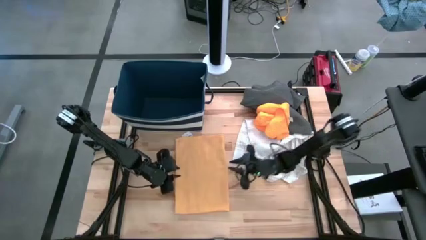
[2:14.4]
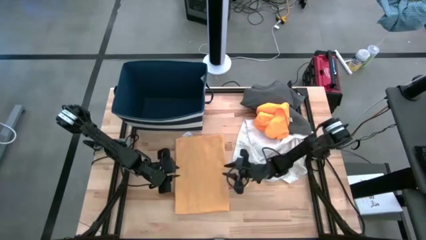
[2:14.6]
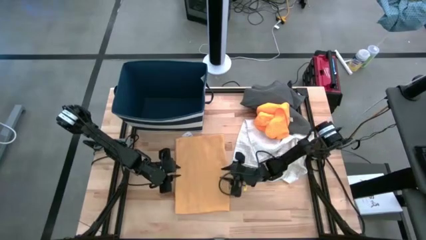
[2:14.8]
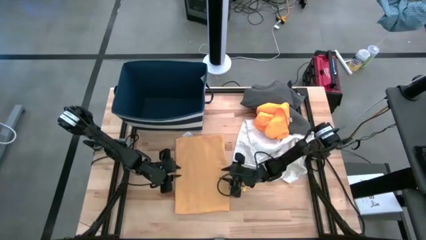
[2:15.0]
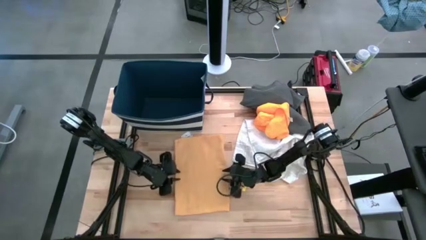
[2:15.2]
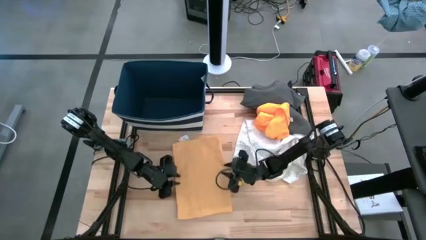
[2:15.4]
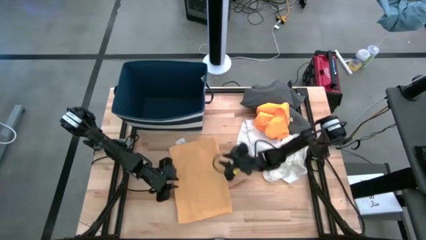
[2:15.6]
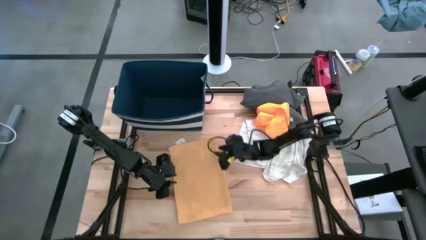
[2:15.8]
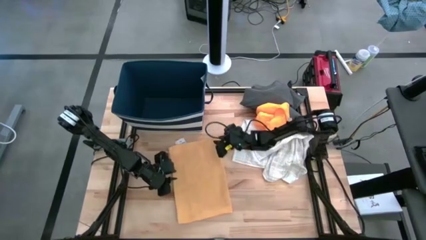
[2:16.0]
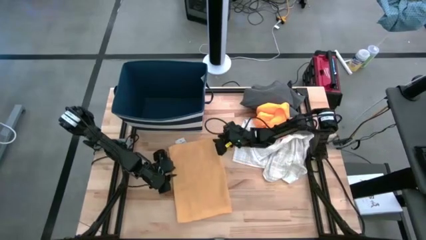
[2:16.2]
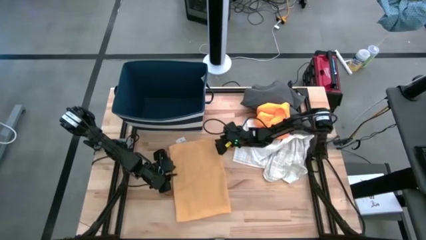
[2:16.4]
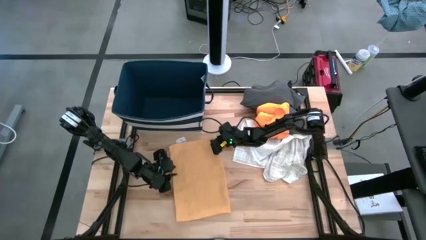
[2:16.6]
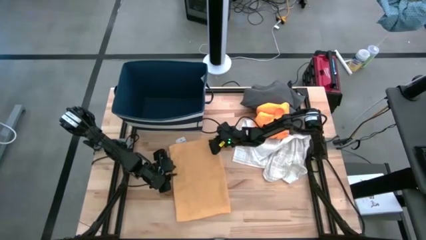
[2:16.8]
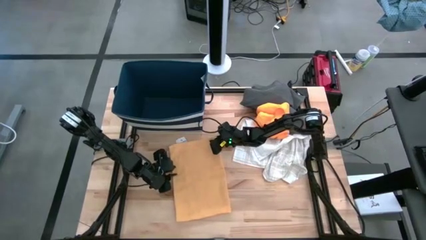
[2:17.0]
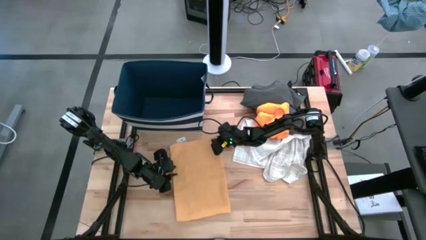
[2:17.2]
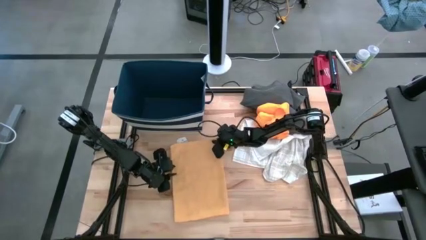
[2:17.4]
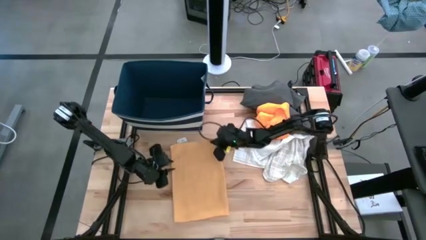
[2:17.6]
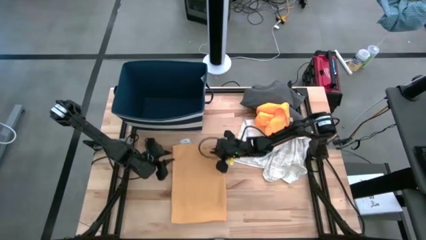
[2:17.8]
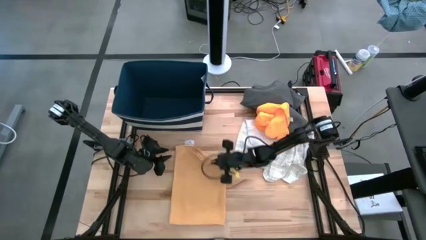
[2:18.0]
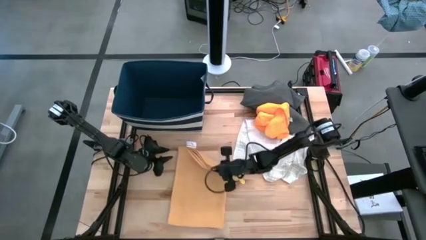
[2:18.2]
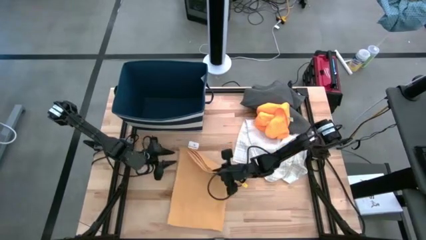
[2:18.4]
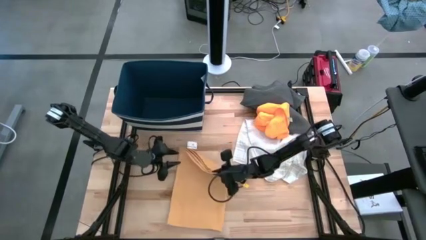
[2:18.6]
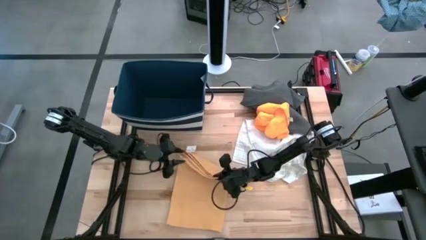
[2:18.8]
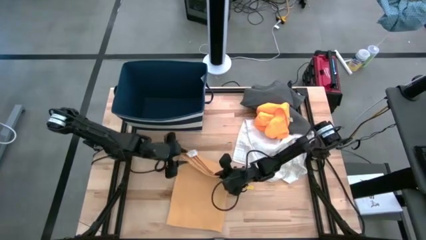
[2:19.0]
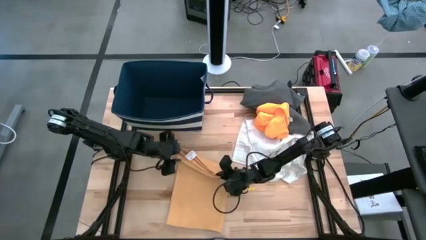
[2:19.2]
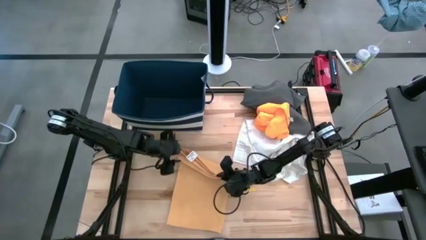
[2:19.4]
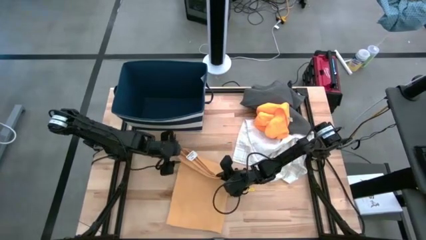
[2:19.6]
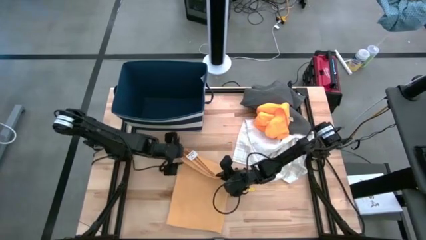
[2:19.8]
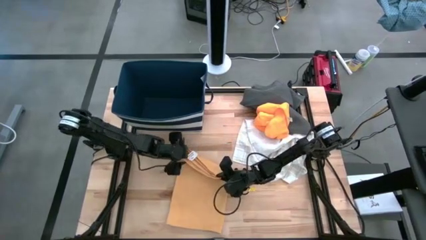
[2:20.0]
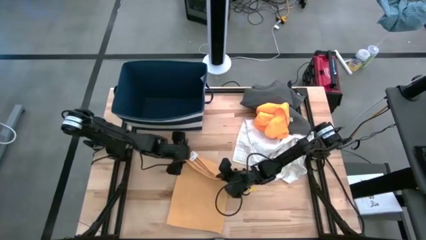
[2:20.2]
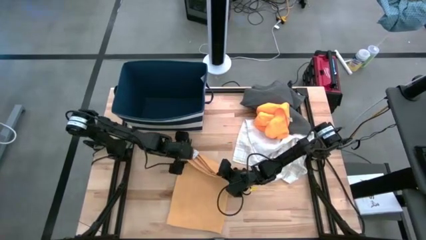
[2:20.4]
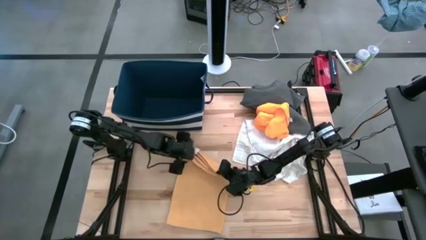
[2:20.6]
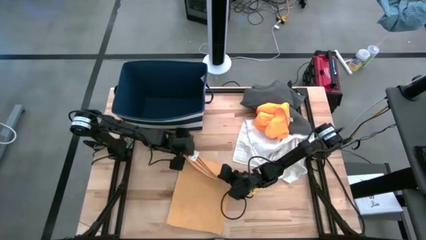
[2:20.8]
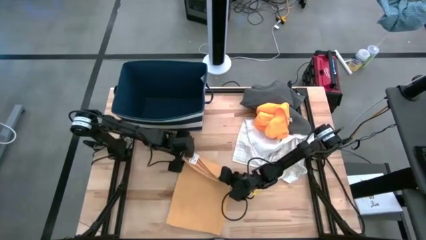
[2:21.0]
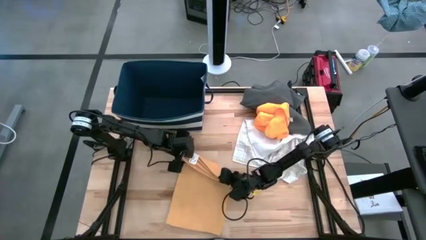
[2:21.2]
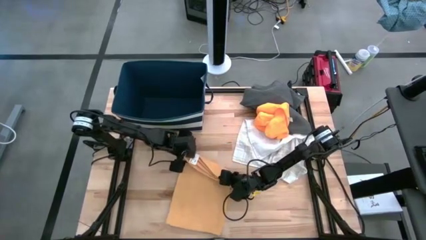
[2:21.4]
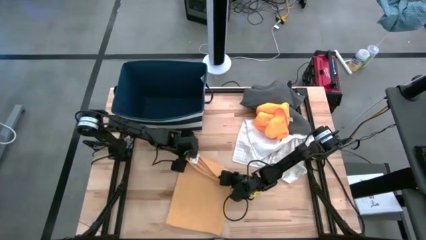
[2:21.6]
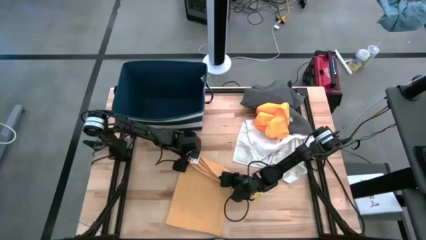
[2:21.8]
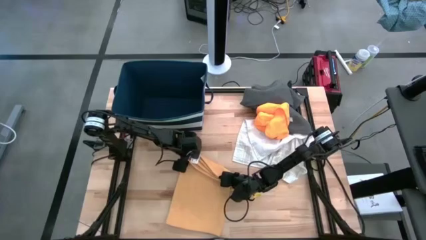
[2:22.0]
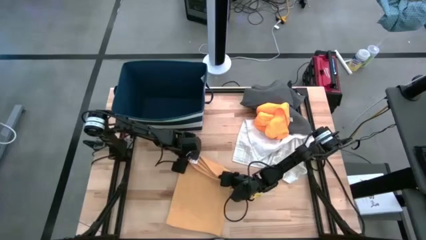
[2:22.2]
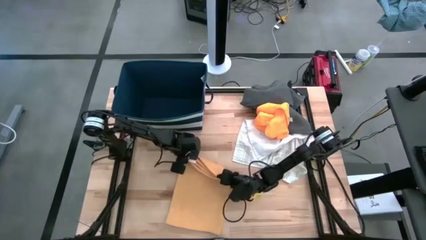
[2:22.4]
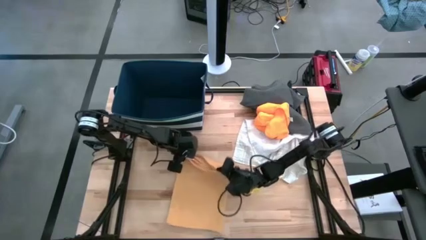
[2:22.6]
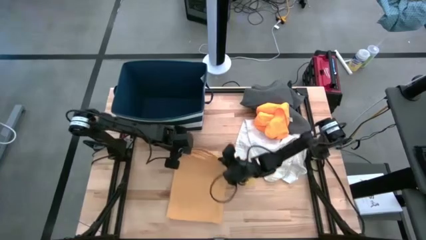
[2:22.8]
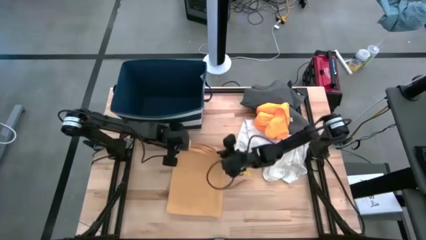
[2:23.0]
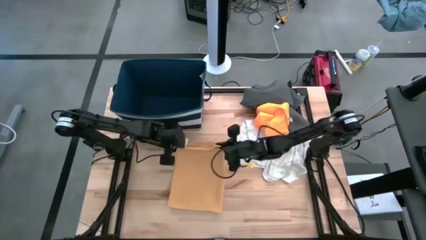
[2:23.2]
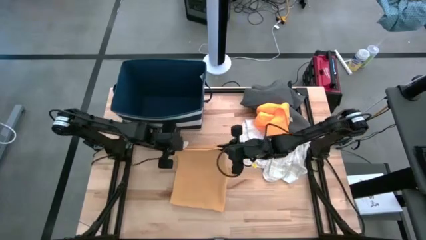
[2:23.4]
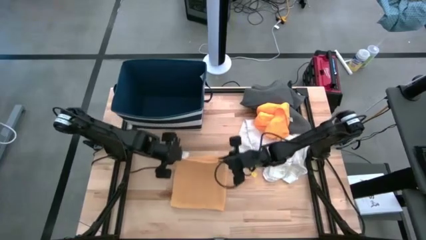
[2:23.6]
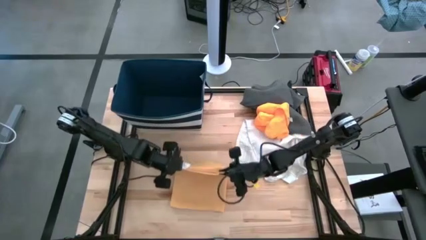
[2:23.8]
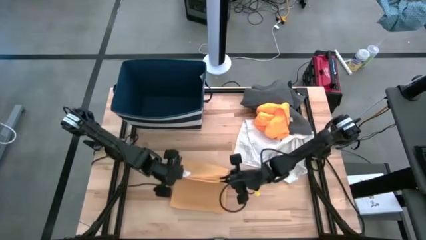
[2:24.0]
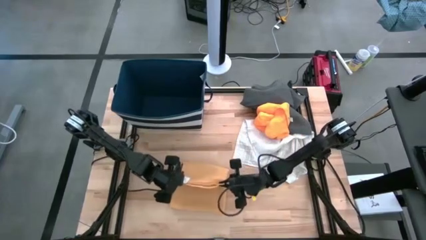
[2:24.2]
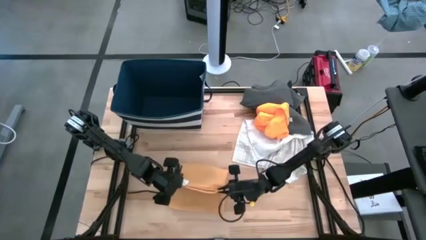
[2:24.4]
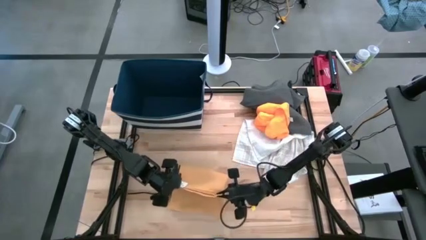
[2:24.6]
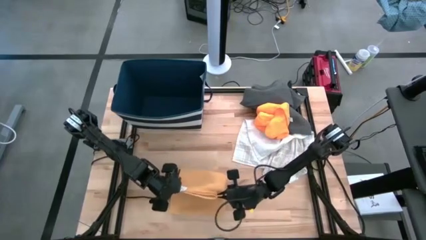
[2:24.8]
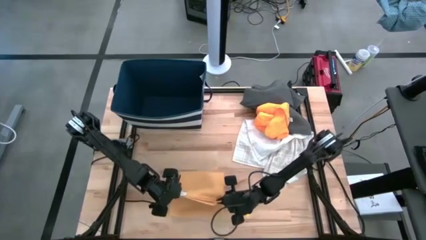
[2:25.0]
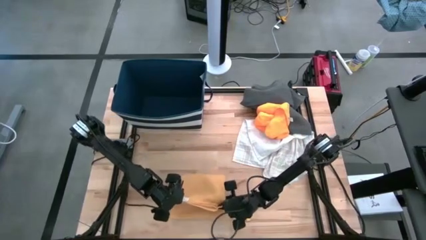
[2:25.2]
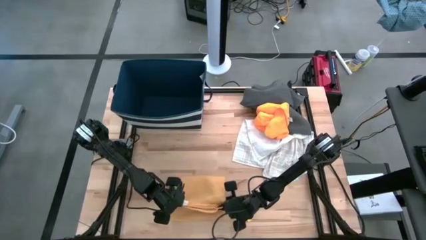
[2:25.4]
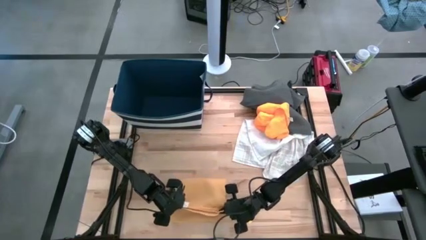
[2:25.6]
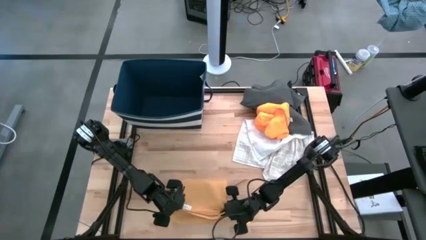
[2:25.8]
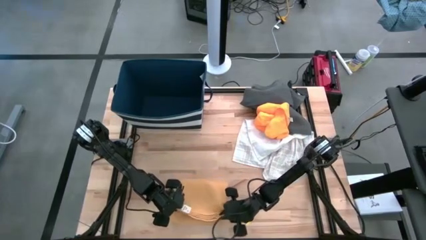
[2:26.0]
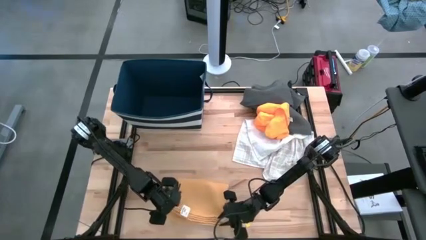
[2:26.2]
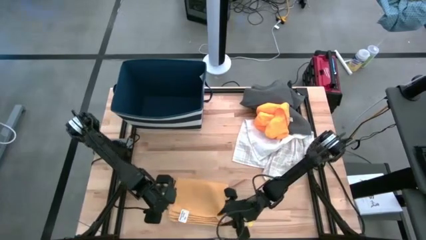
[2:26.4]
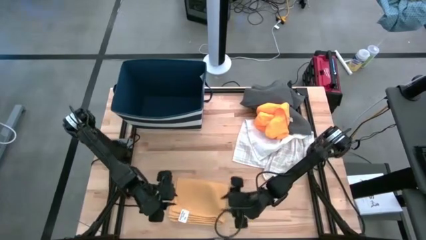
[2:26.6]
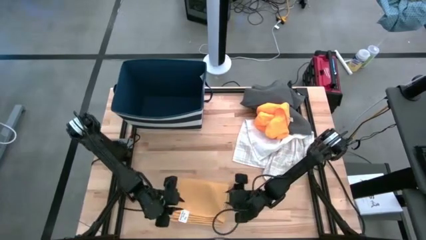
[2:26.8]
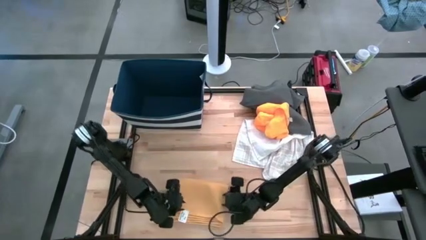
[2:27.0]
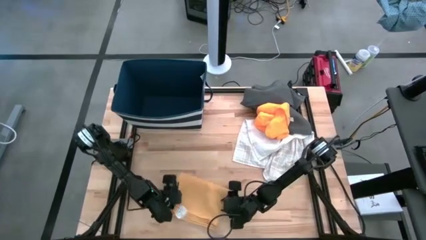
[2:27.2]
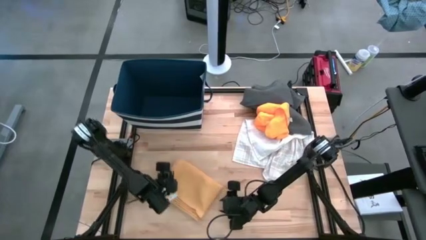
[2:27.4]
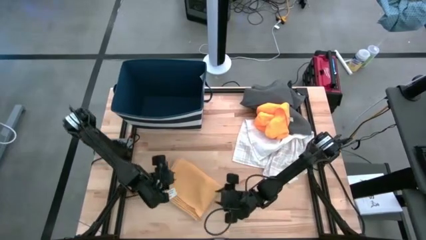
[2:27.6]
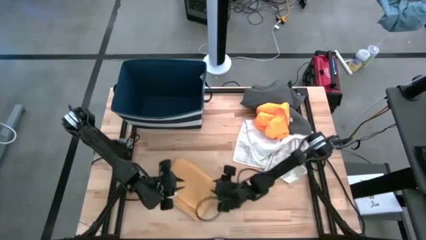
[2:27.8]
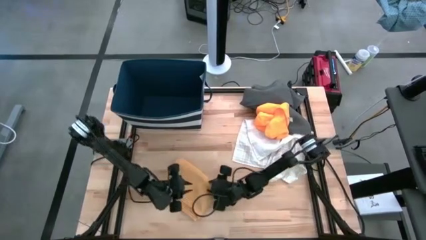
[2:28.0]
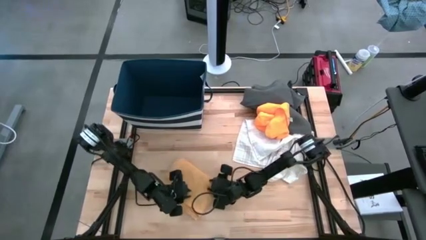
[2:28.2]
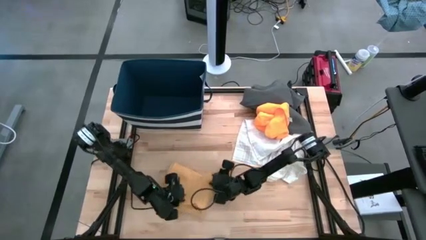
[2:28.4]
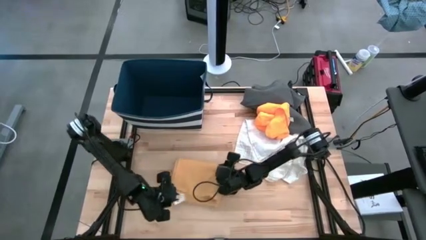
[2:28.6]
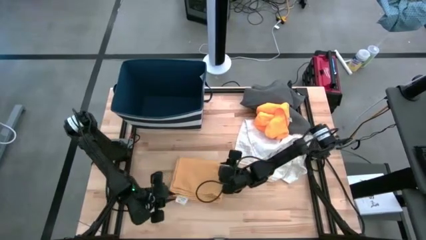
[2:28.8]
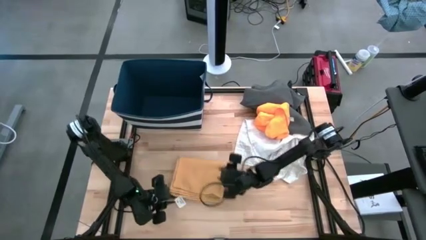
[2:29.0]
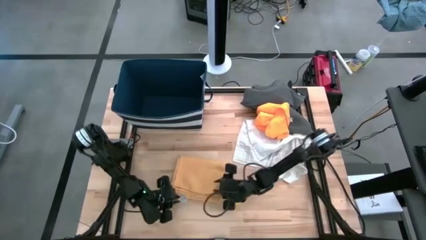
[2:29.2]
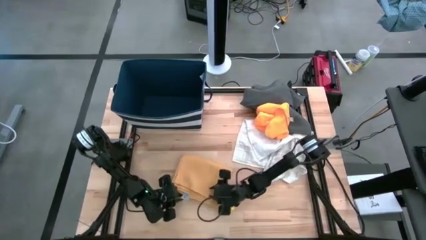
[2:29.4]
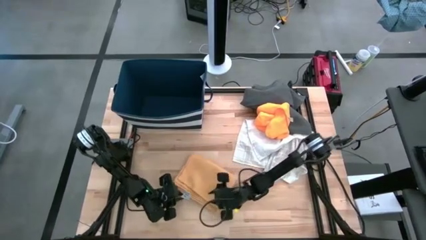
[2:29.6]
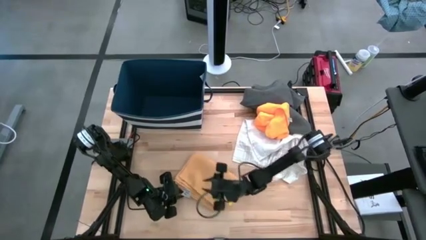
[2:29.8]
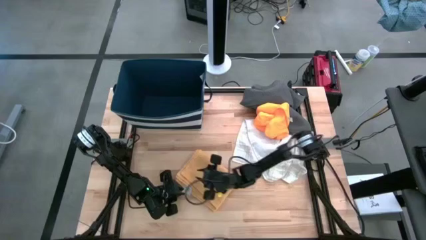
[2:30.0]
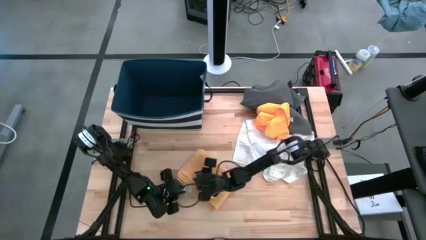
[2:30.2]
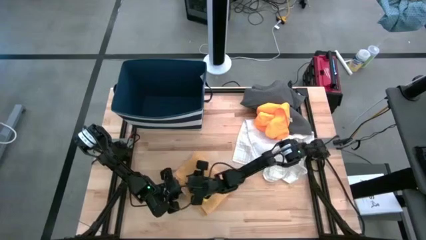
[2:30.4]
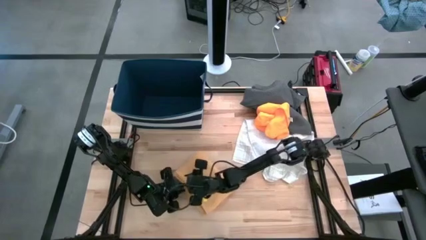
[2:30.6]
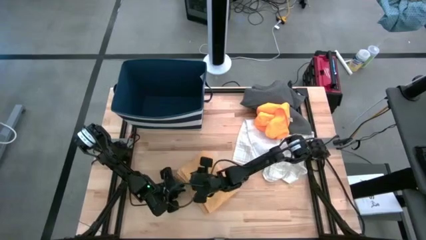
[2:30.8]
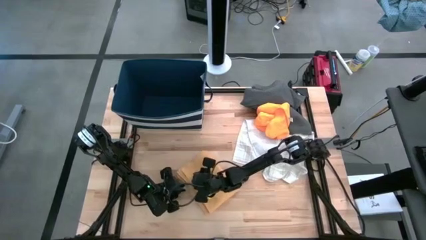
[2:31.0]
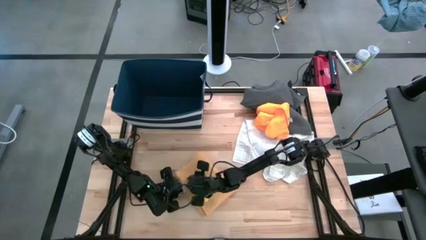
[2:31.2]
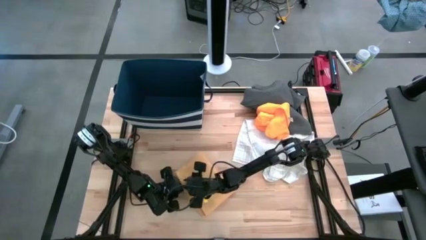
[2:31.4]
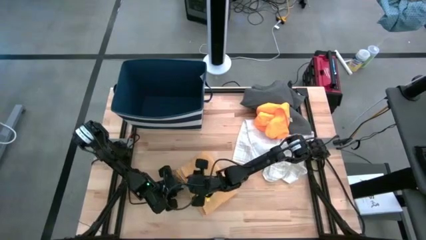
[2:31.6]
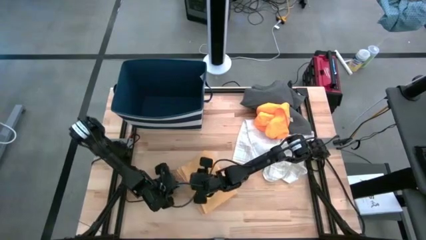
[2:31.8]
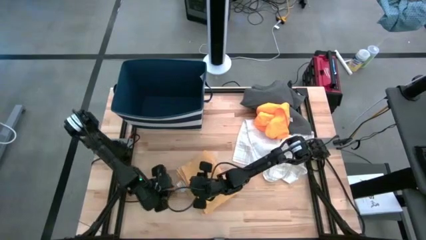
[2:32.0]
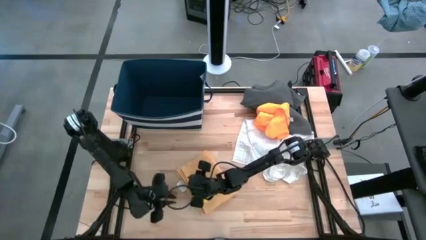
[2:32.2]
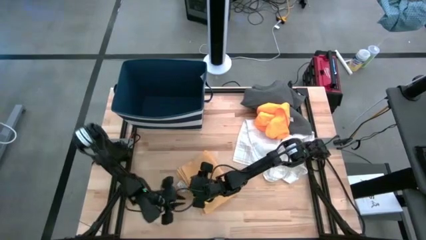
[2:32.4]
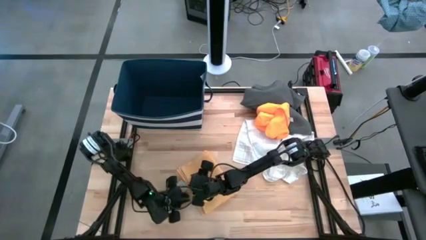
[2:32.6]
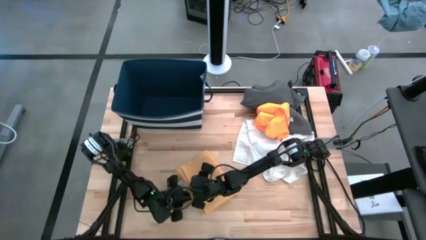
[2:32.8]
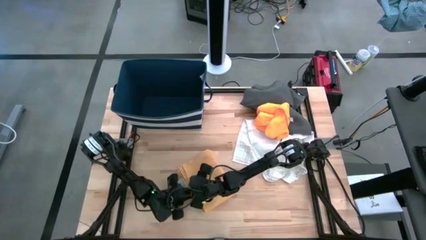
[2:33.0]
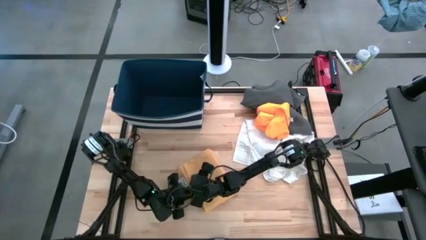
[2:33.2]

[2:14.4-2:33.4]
Task: Fold towel
Fold the yellow kitchen towel
